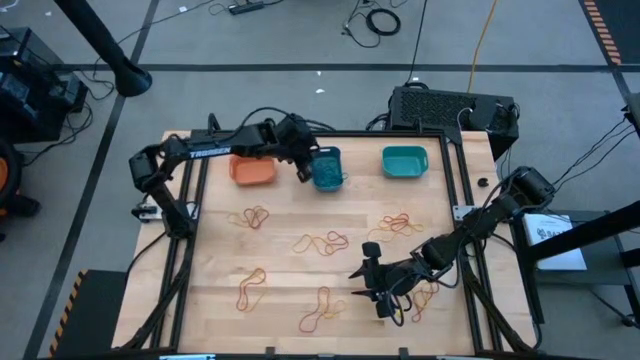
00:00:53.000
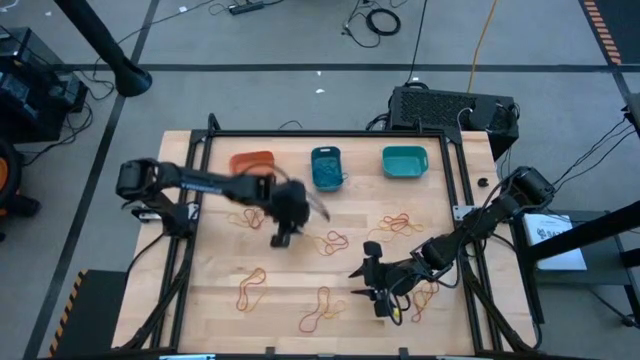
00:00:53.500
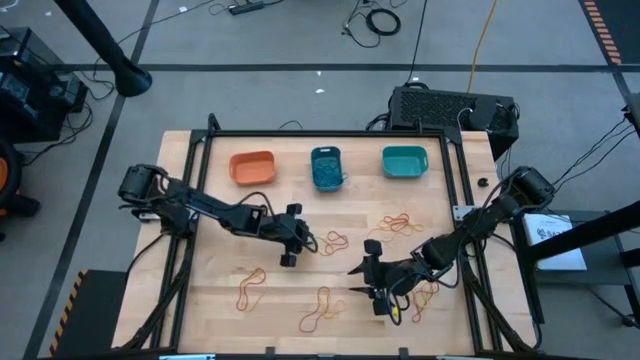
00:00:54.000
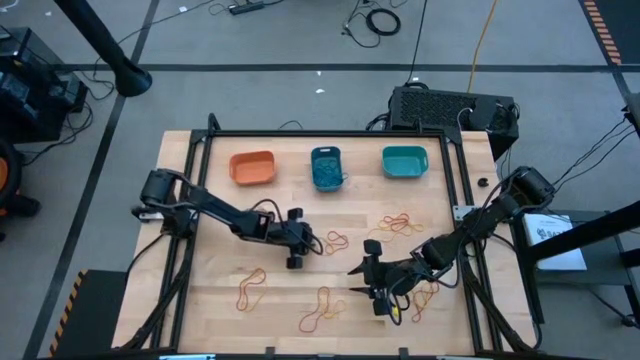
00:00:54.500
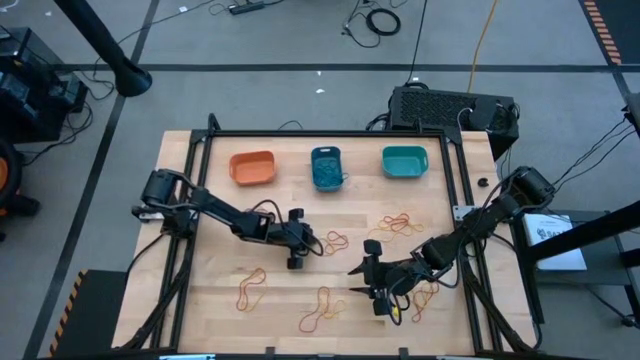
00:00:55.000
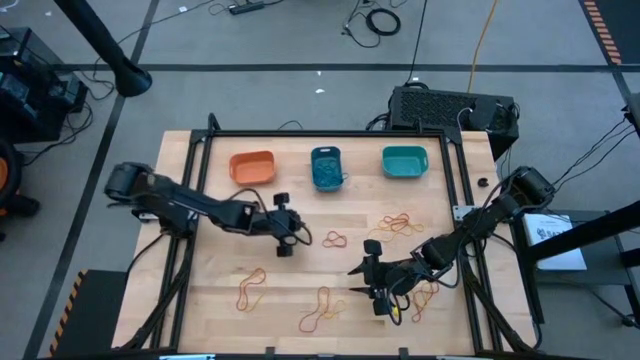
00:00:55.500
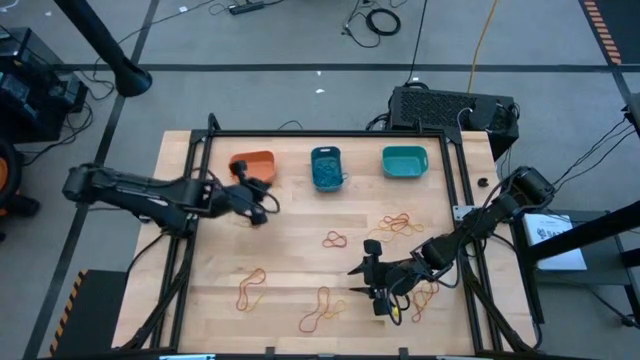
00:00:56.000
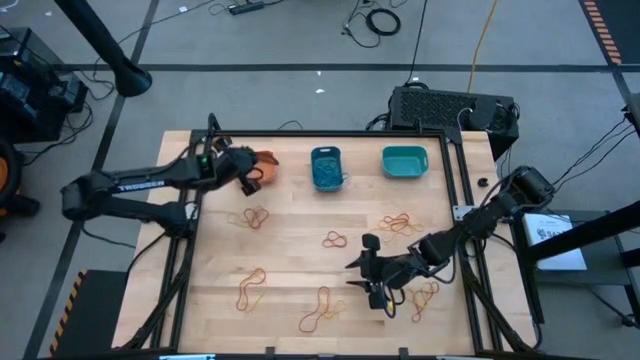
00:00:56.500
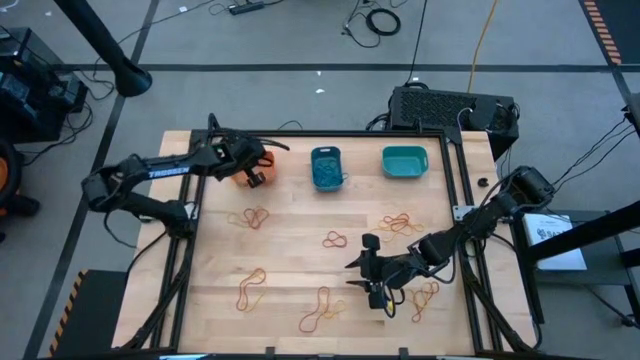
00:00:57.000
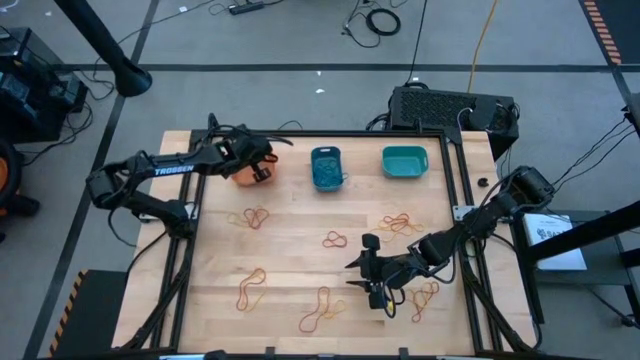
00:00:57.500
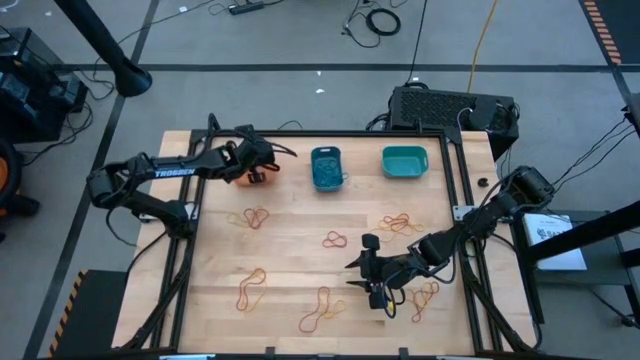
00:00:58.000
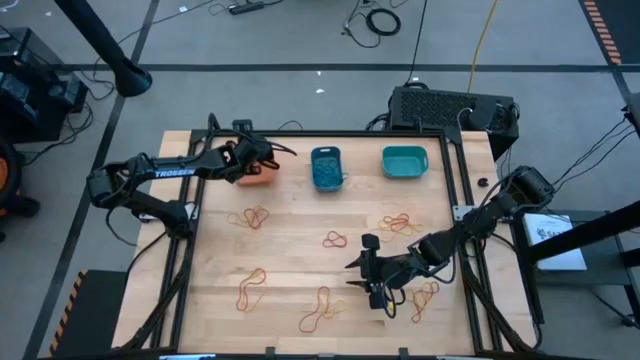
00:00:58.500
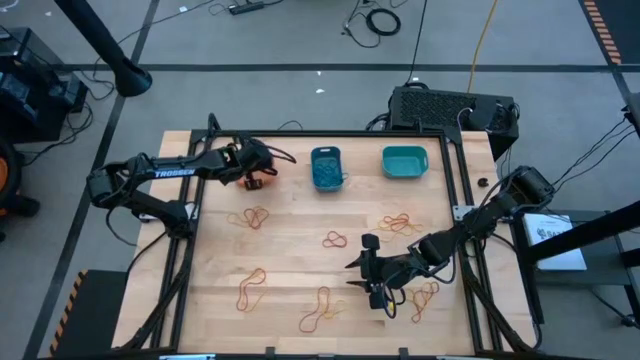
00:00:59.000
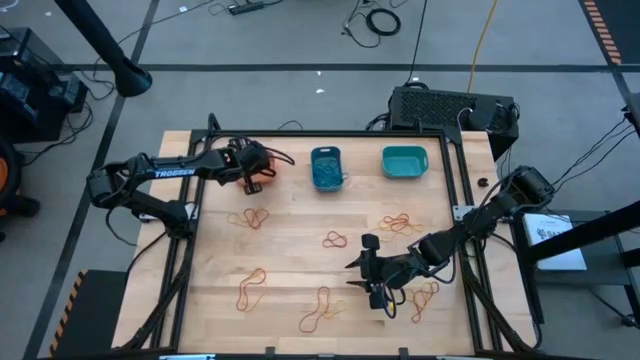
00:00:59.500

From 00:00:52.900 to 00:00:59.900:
Task: Sort rubber bands into baskets
Put the yellow rubber band into the orange bin

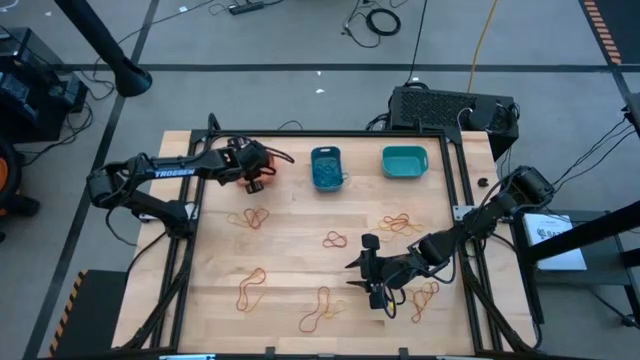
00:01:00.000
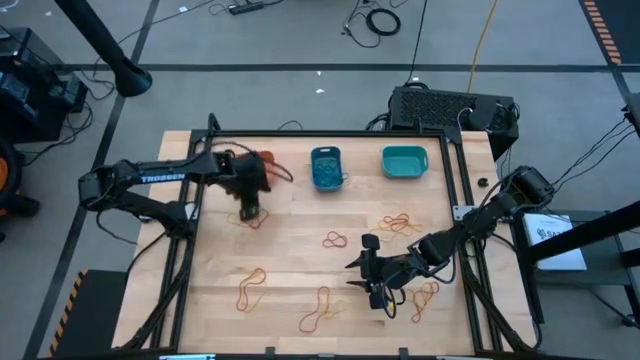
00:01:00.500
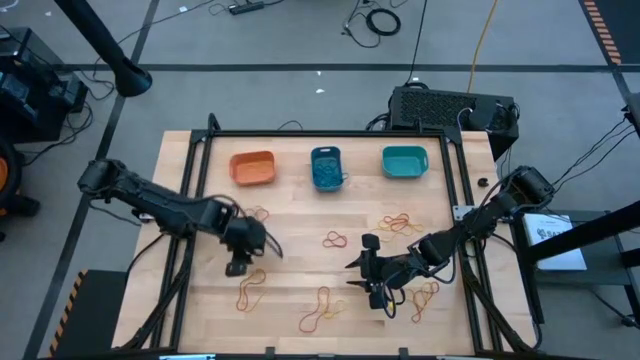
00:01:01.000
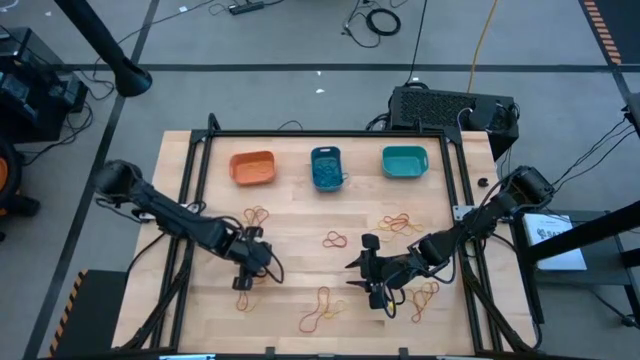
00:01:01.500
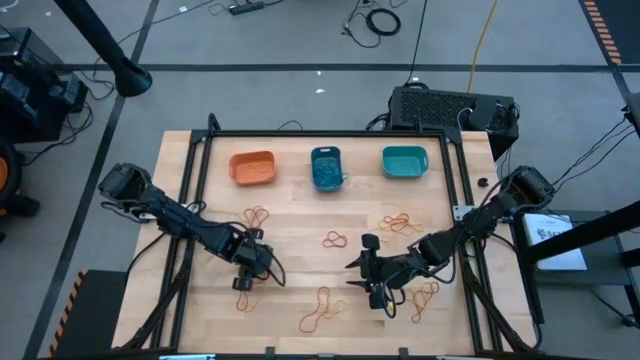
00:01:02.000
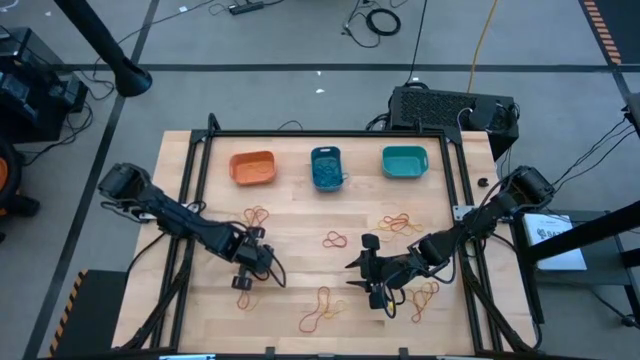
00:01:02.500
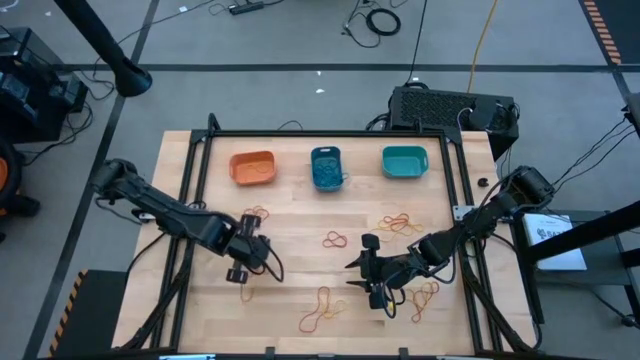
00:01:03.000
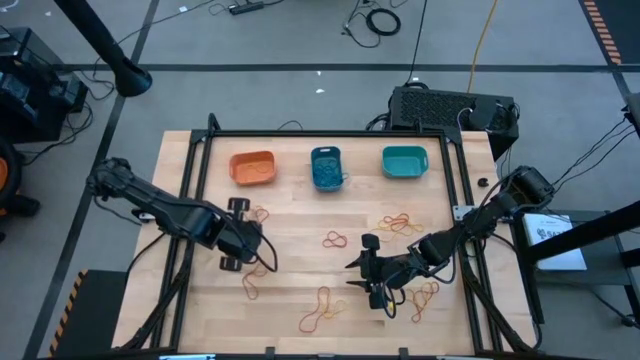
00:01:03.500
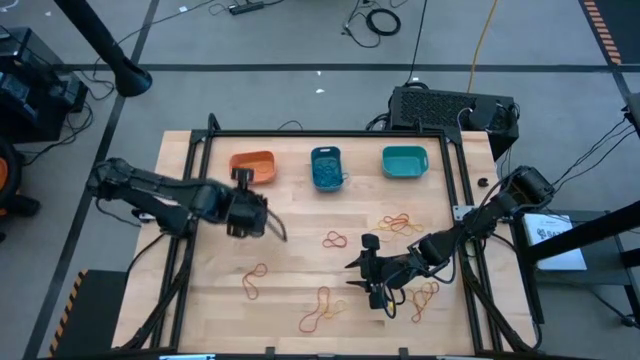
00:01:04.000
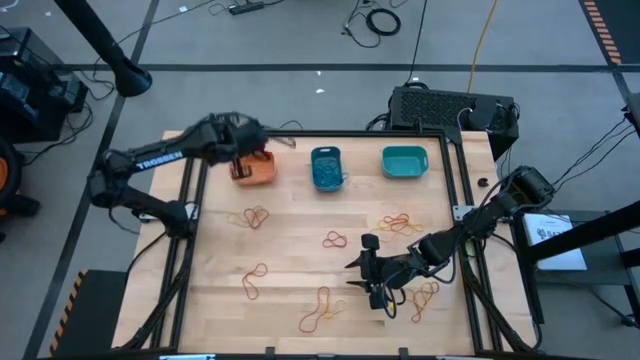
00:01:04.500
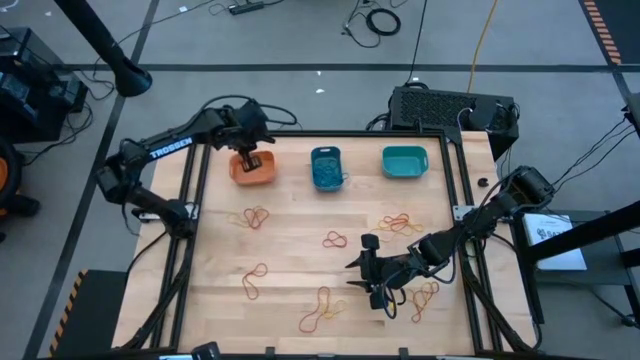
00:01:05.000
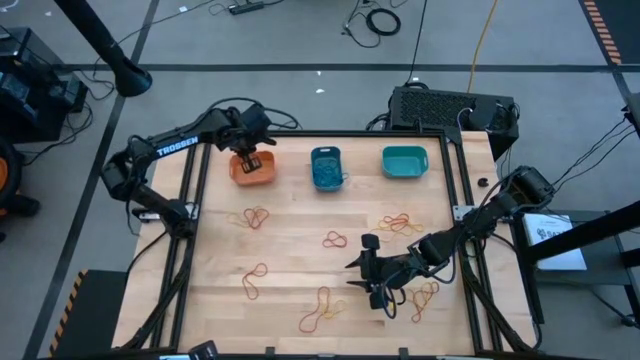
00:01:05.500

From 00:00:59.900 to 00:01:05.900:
Put the yellow rubber band into the orange bin

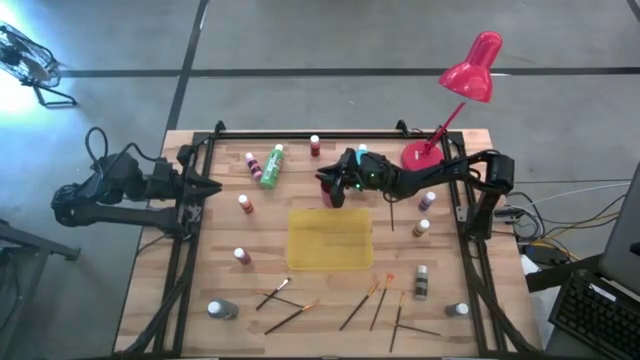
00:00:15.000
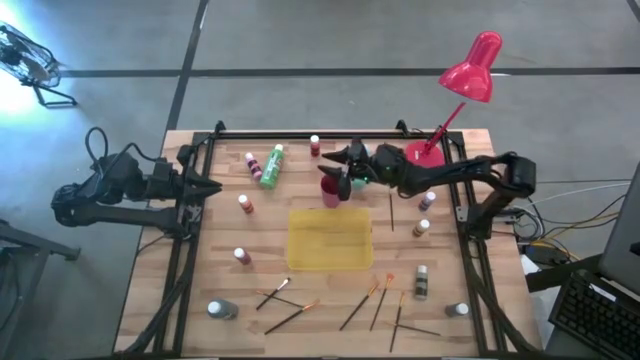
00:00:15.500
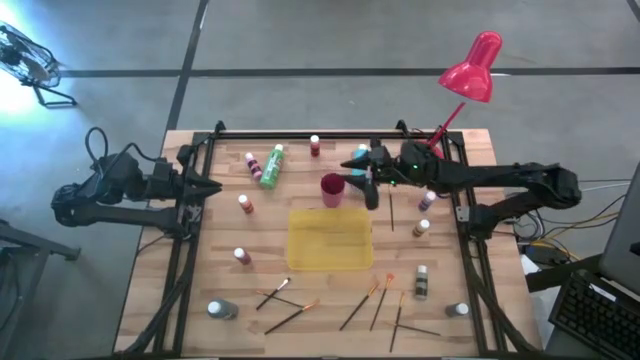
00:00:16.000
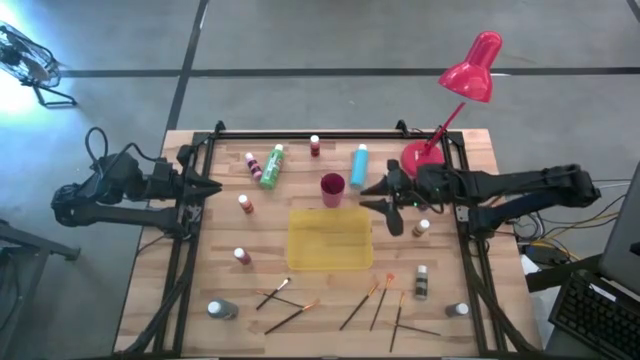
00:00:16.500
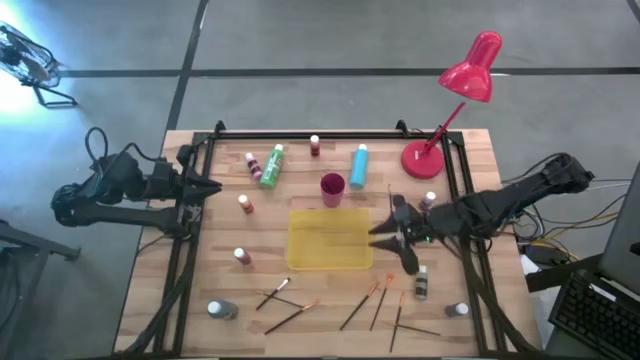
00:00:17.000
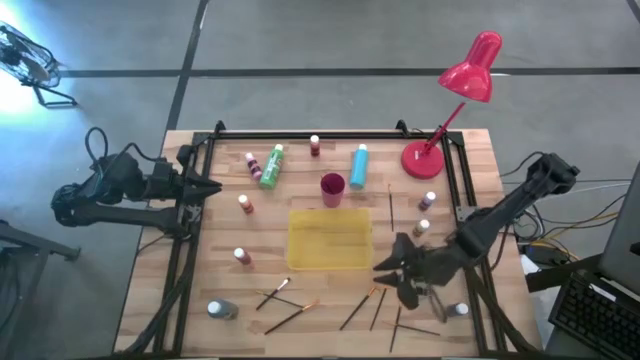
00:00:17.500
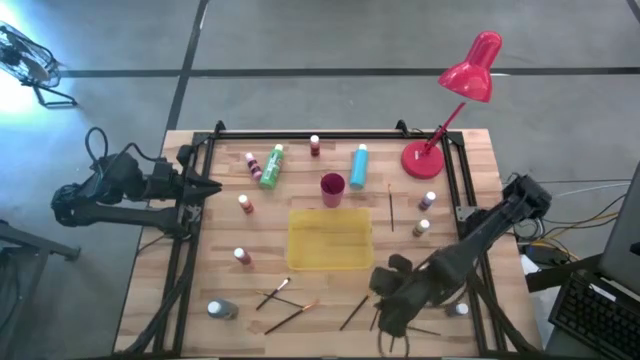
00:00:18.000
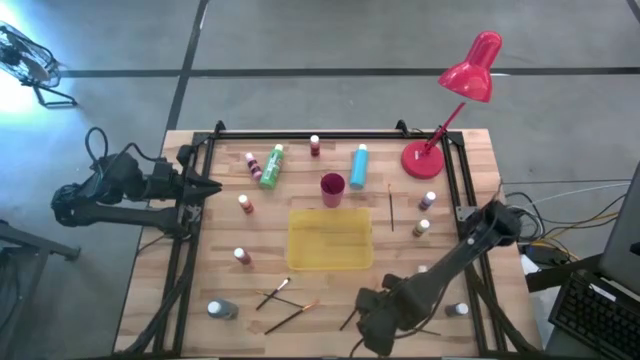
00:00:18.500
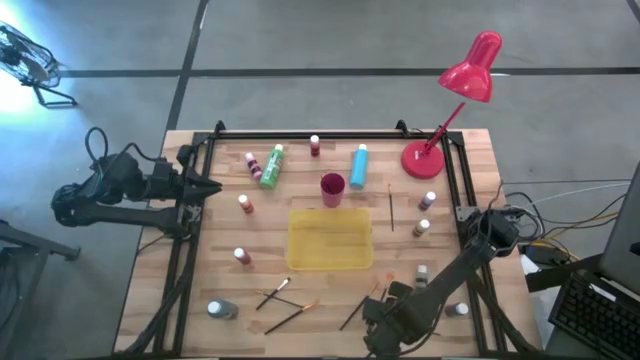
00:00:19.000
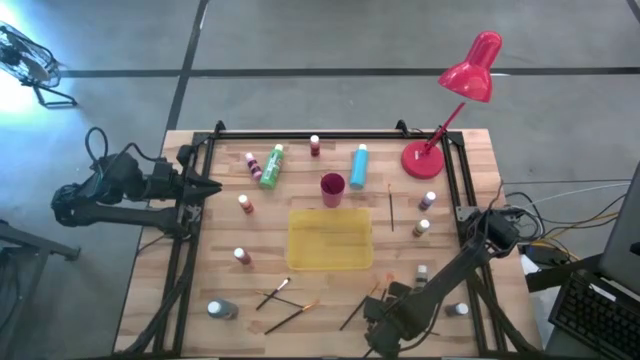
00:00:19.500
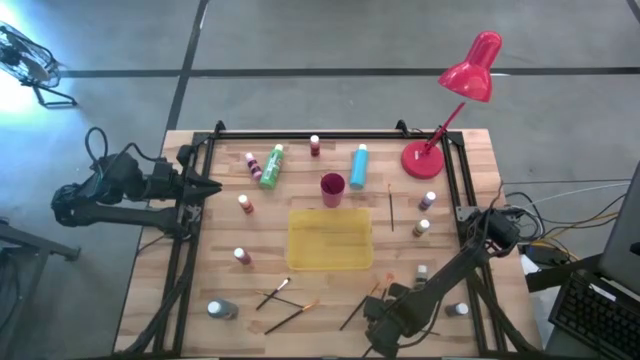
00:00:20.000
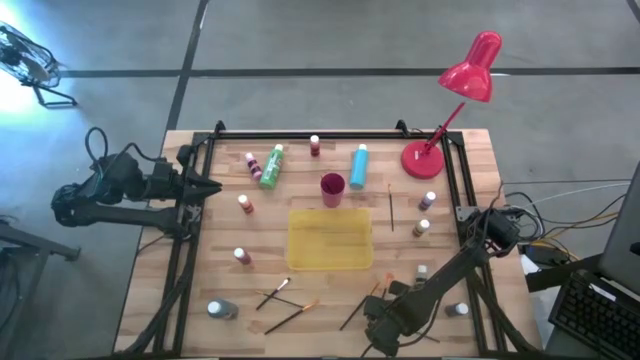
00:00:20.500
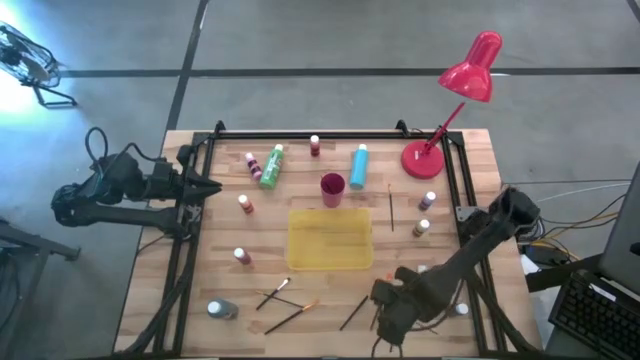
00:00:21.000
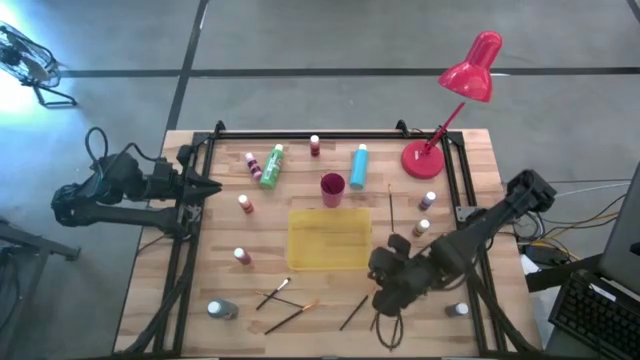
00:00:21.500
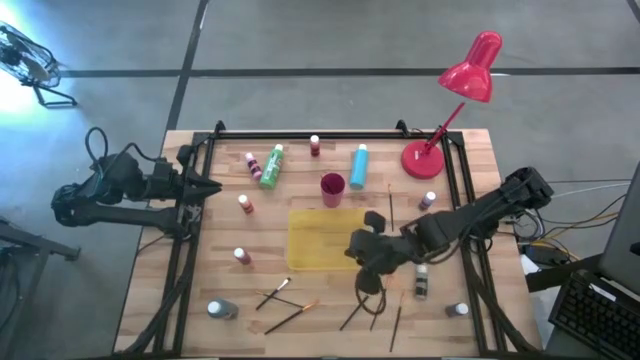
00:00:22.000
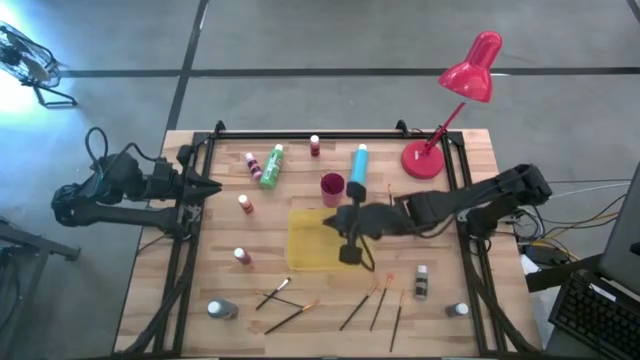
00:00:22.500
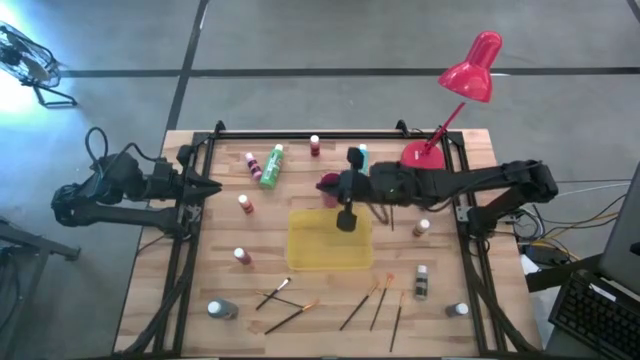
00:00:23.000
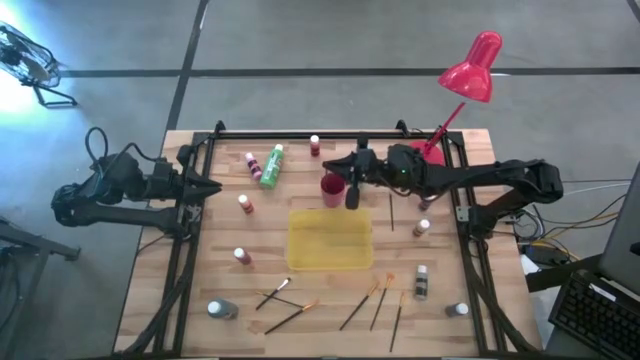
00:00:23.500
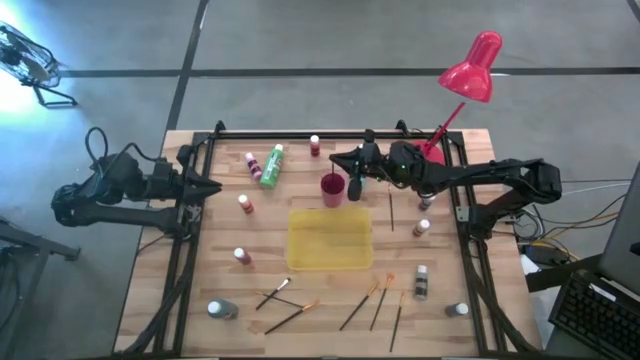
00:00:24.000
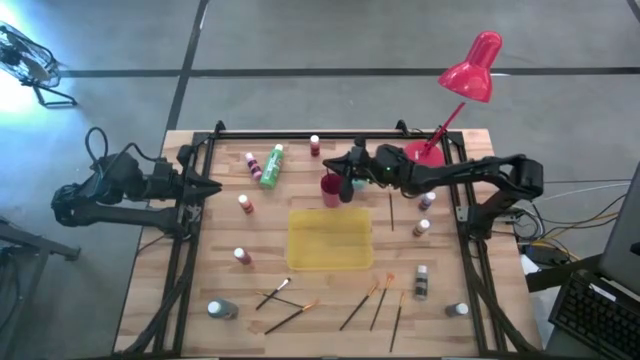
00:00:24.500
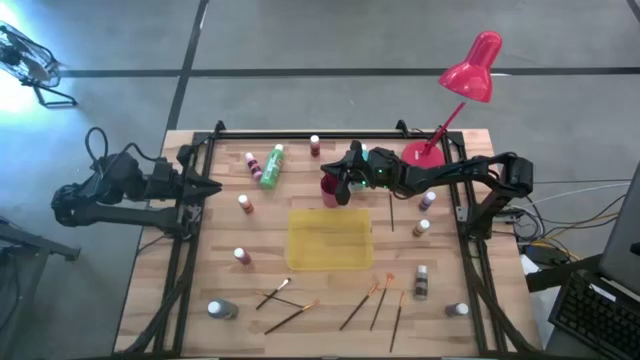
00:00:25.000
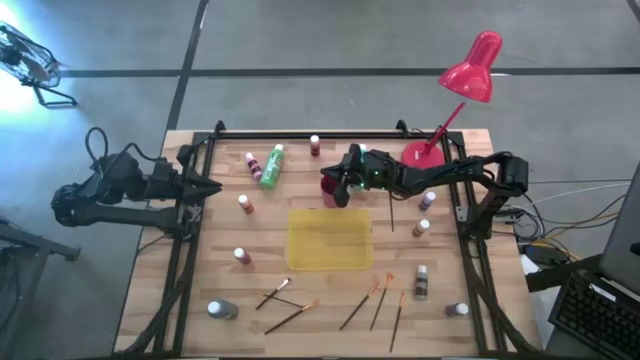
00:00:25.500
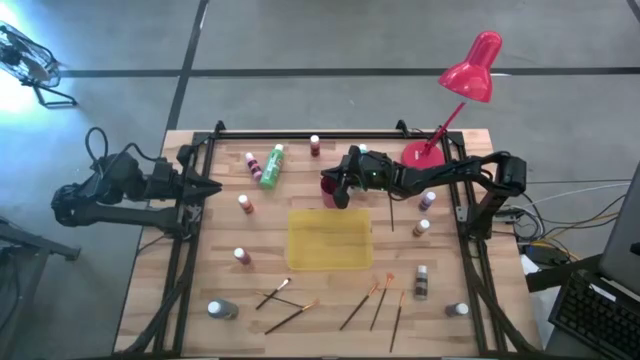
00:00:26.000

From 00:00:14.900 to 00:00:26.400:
Task: Pick & Place Paint Supplies
Put the gold paint brush into the pink cup
